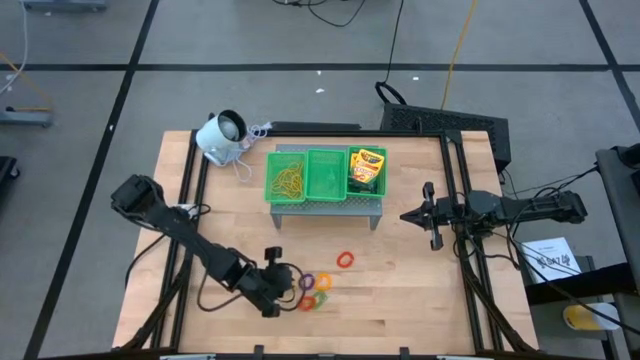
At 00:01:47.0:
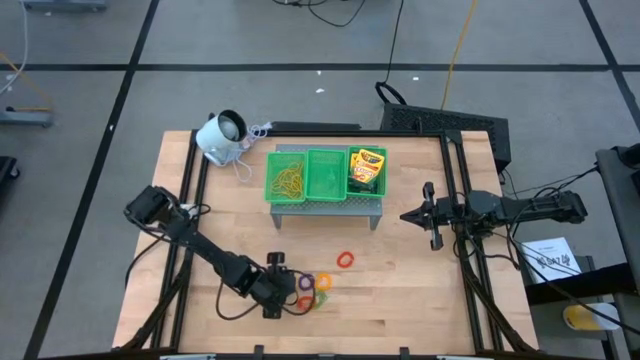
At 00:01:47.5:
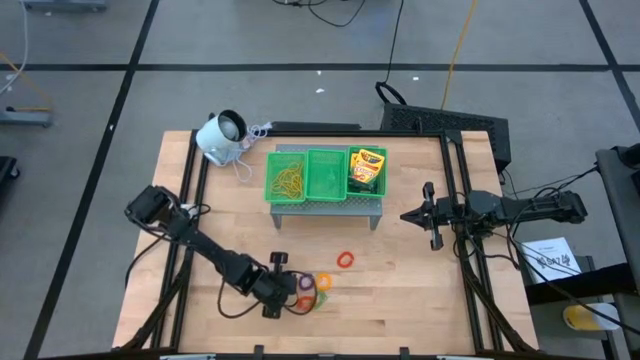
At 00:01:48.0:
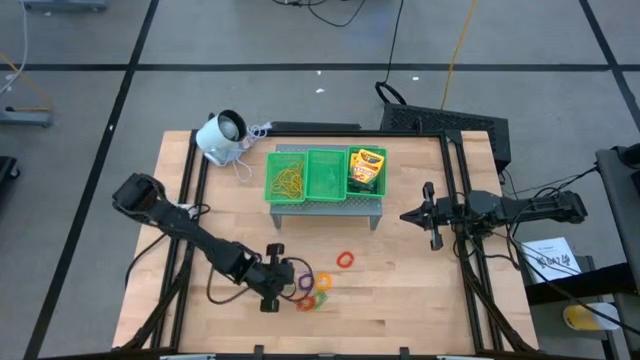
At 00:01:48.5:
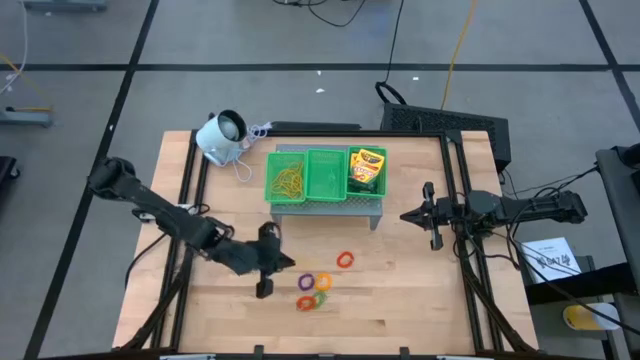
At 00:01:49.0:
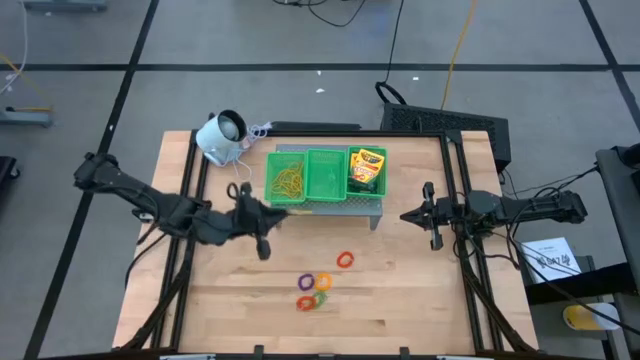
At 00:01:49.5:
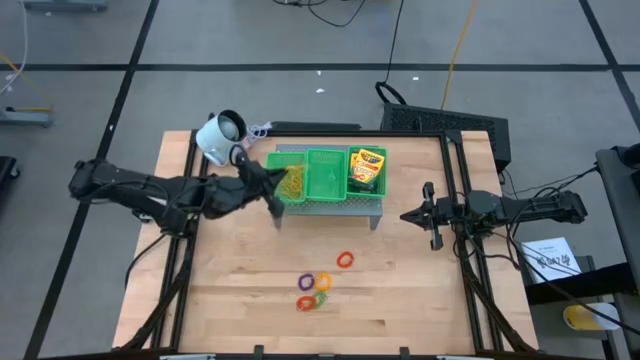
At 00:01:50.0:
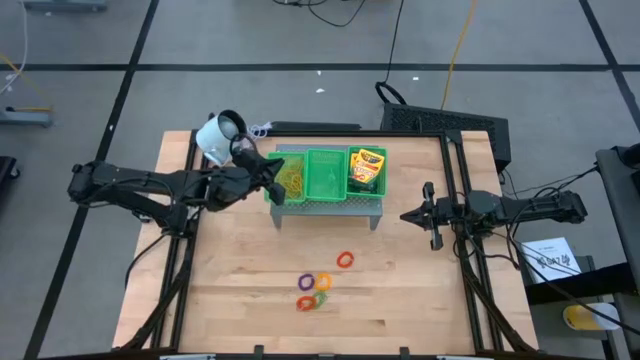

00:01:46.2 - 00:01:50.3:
Task: Pick & Place Office Desk Supplies
Put the yellow rubber band into the left green basket

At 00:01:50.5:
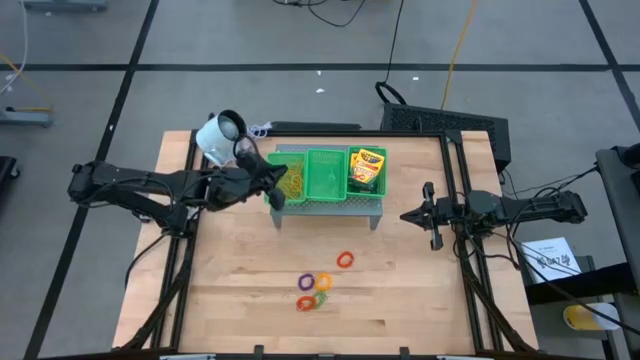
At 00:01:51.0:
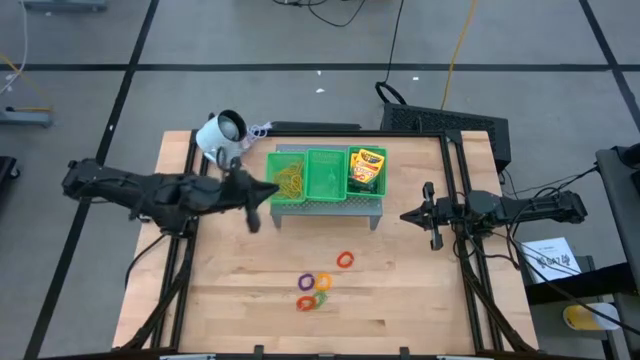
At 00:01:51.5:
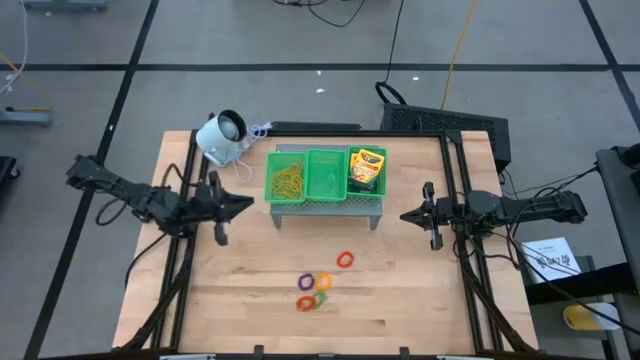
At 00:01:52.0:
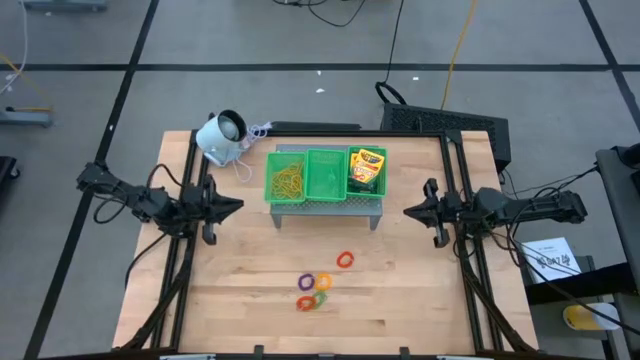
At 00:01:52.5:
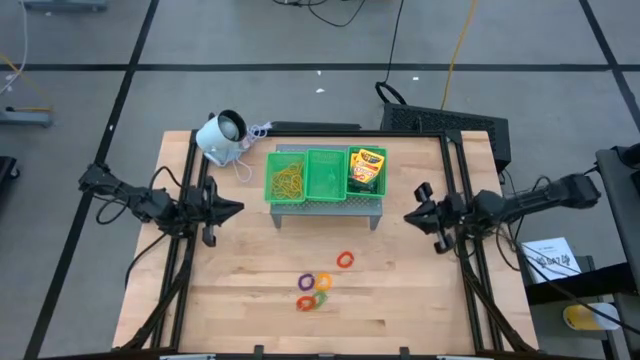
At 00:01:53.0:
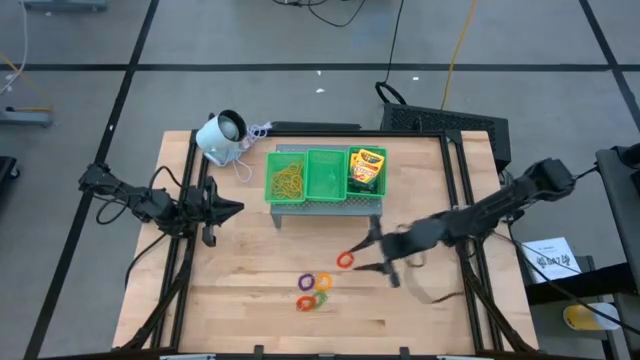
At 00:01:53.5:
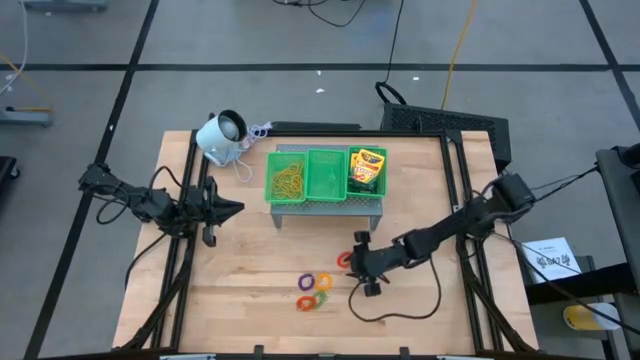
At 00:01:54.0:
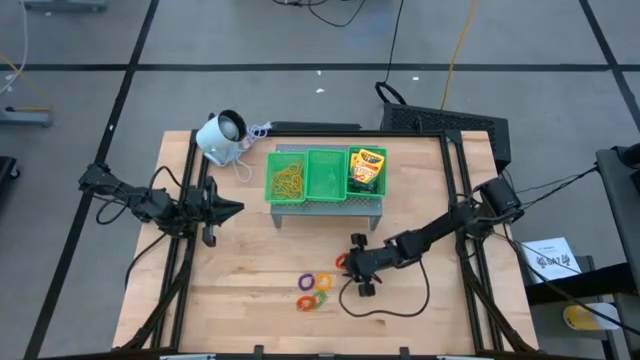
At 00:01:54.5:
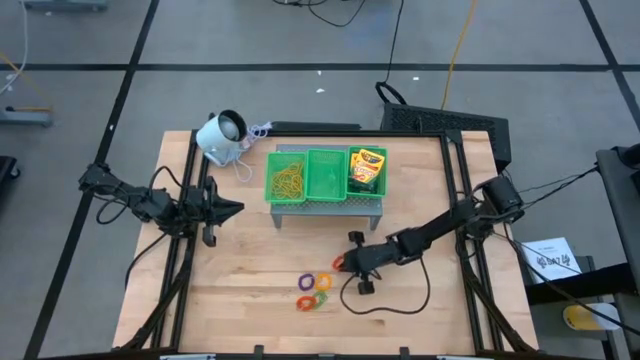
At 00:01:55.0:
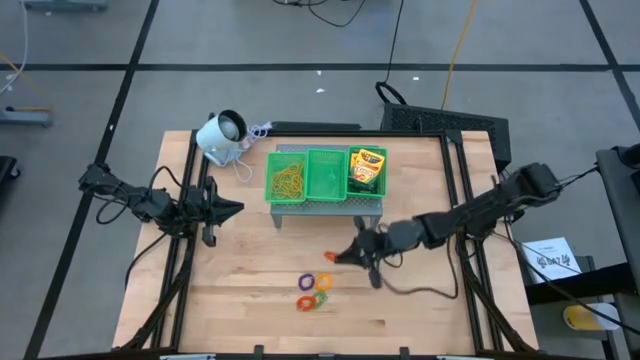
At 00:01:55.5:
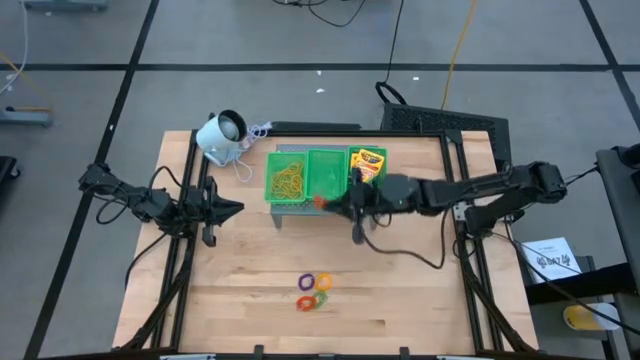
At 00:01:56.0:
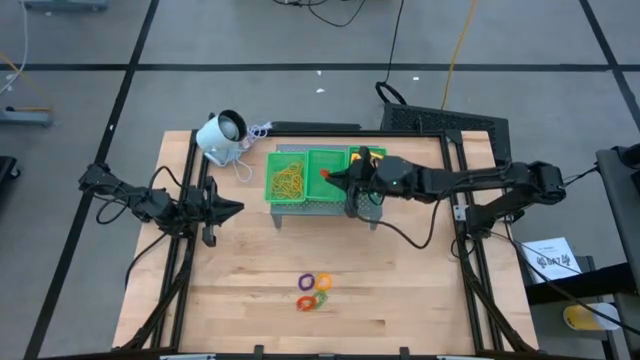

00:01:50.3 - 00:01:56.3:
Put the top orange spring keychain into the center green basket

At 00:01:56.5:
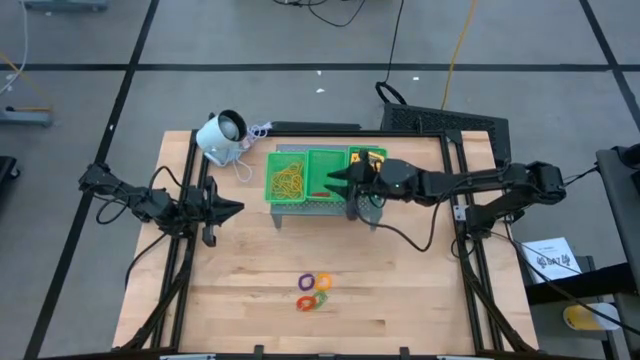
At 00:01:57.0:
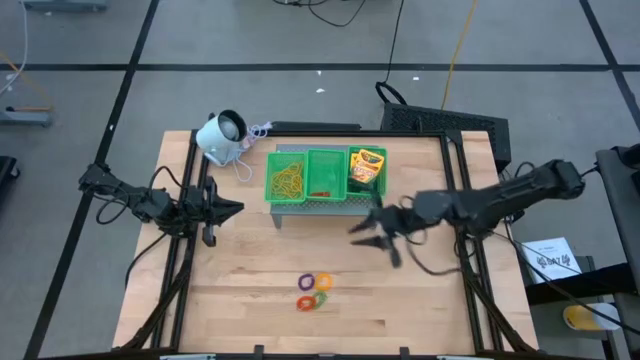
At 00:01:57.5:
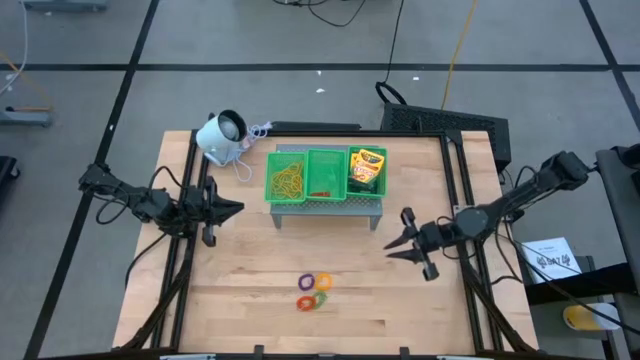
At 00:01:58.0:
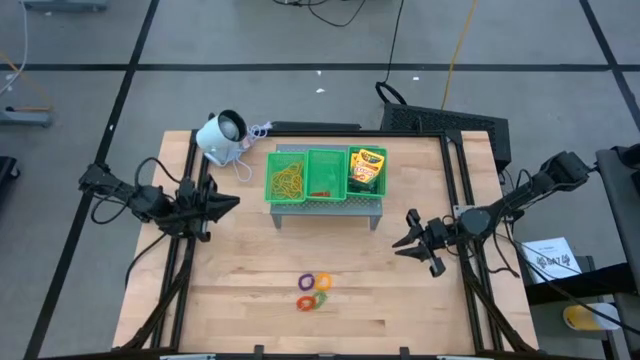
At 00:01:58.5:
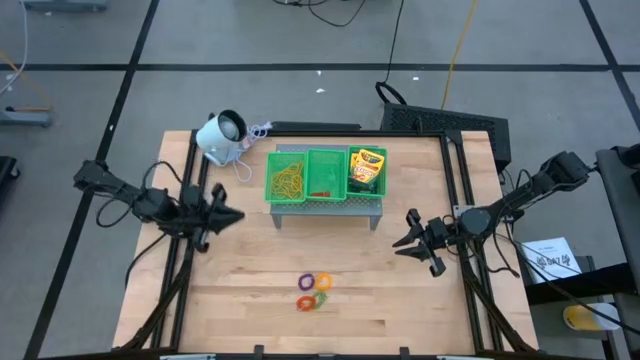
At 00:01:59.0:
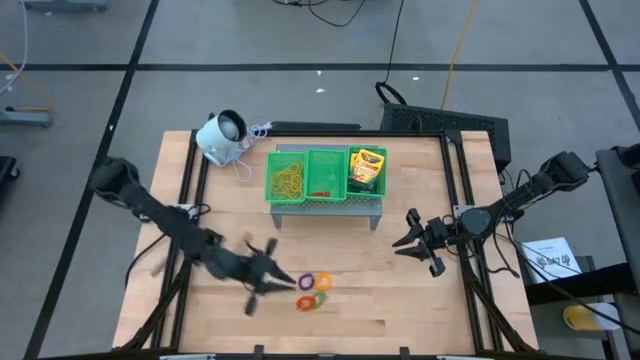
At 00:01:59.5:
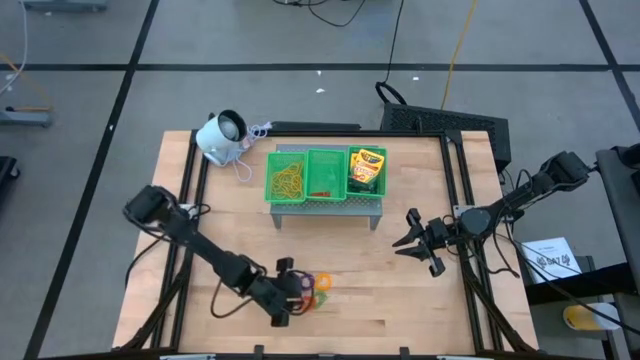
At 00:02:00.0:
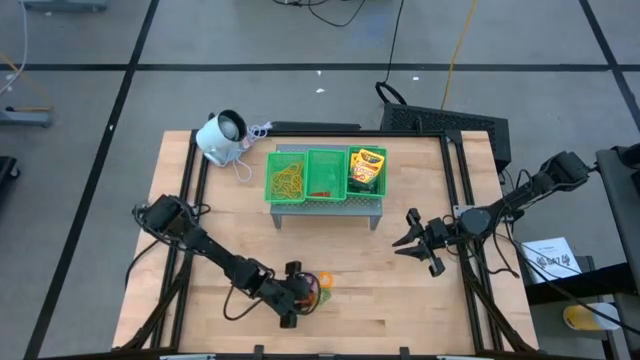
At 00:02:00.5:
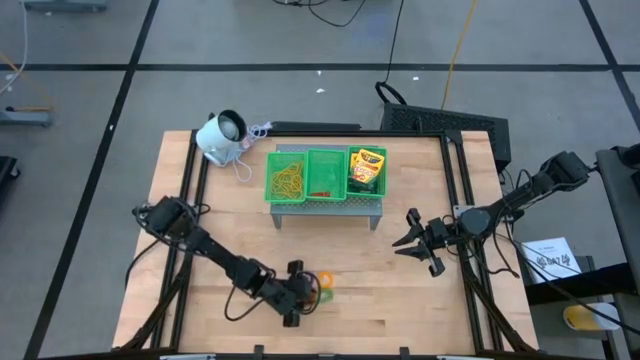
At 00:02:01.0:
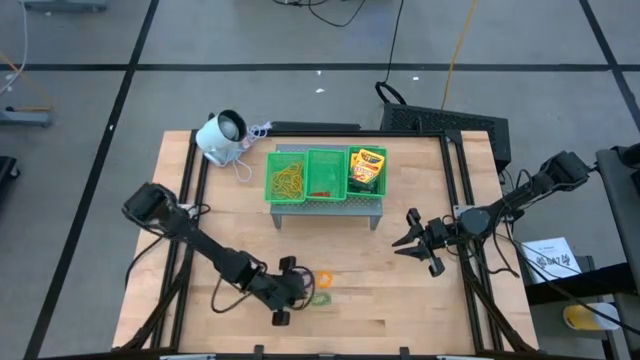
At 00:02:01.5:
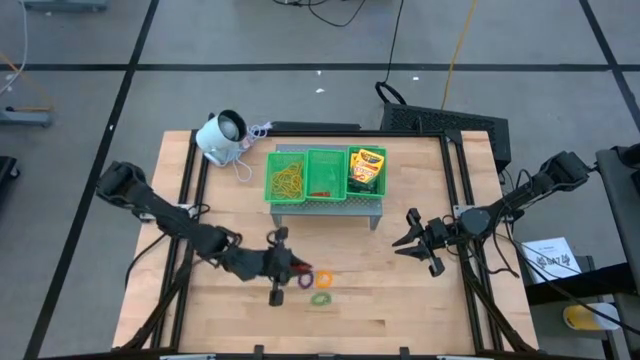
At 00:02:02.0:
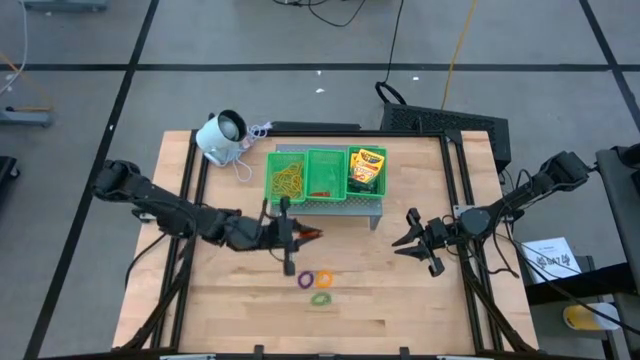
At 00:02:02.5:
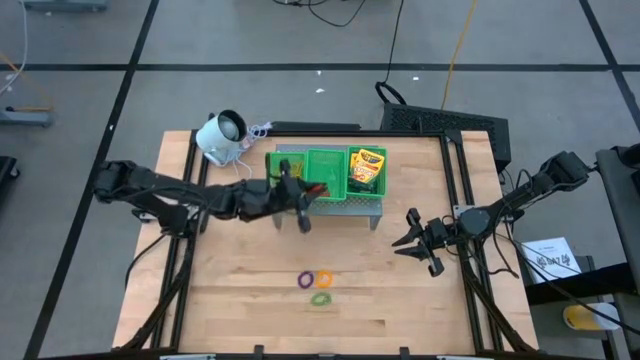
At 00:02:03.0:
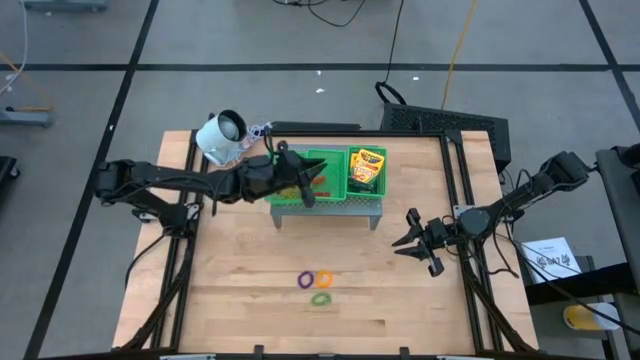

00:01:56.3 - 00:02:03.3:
Put the orange spring keychain into the center green basket

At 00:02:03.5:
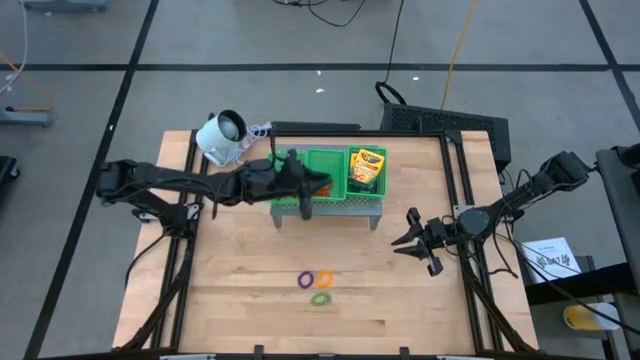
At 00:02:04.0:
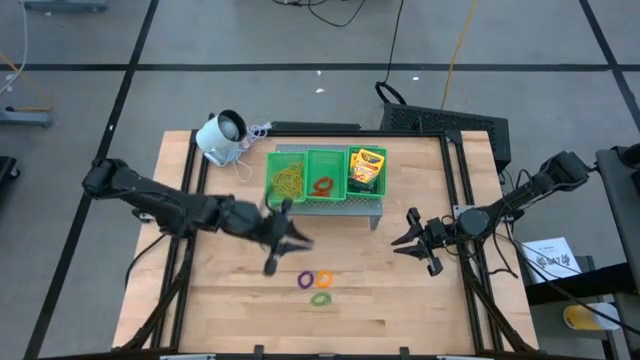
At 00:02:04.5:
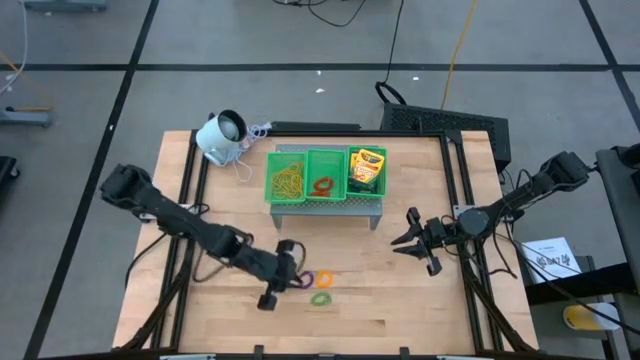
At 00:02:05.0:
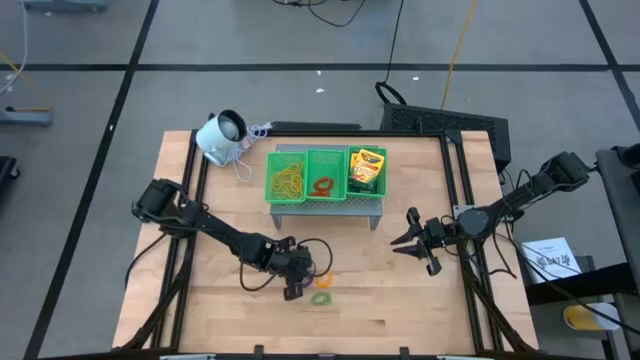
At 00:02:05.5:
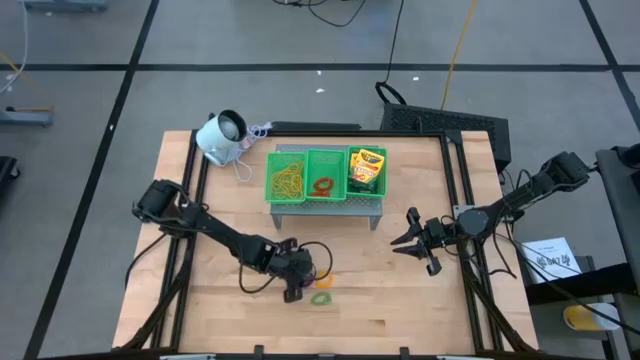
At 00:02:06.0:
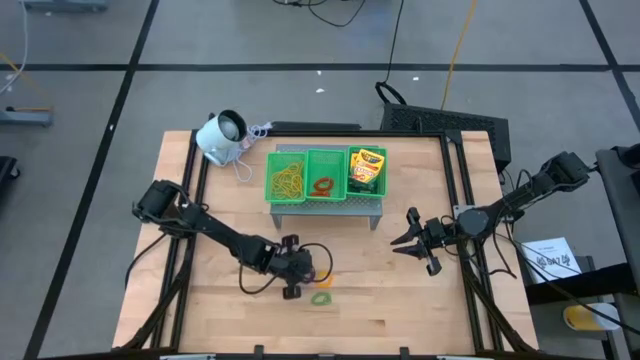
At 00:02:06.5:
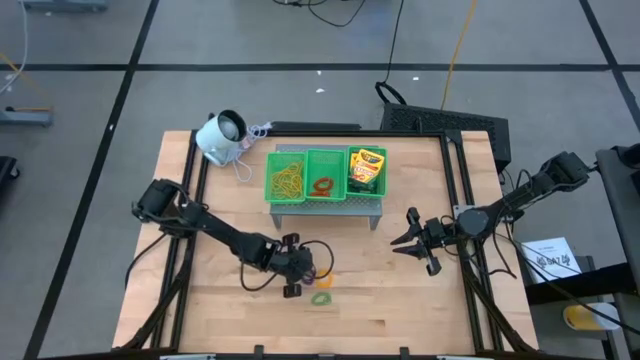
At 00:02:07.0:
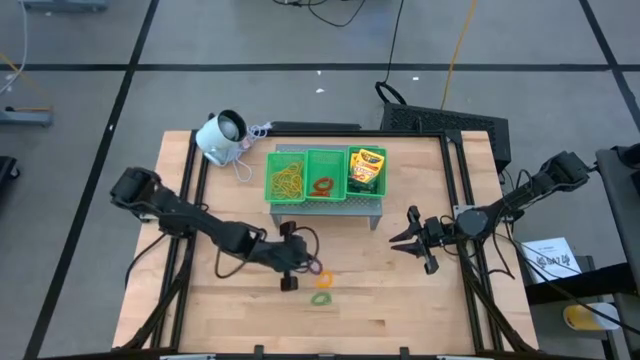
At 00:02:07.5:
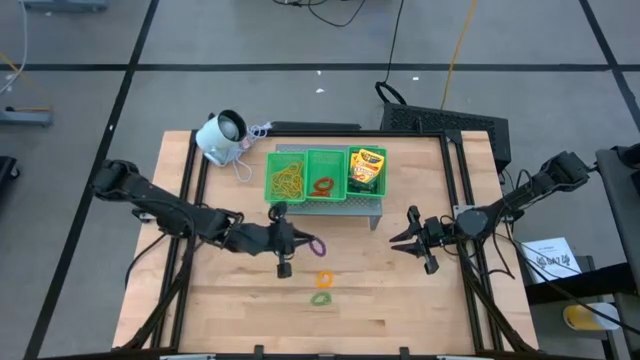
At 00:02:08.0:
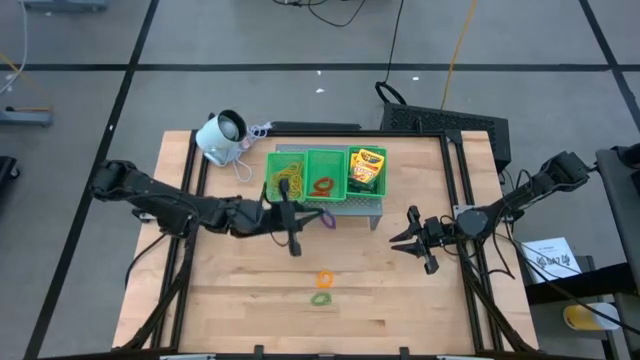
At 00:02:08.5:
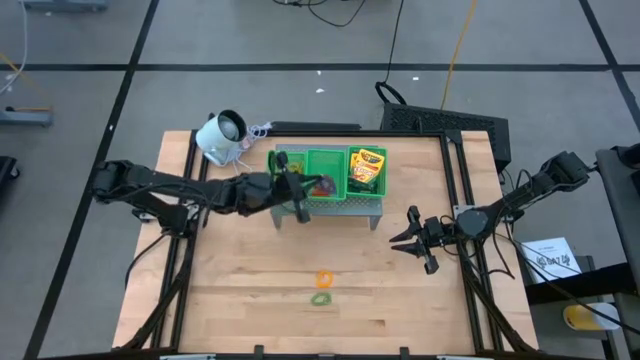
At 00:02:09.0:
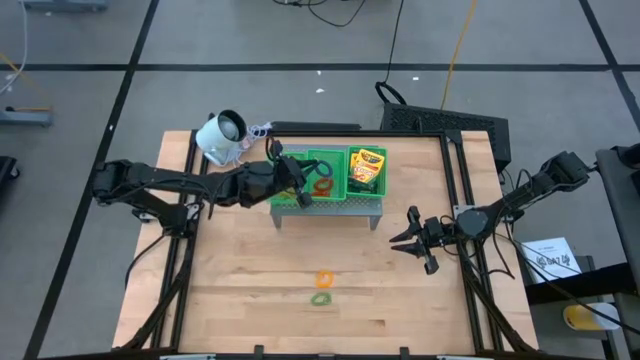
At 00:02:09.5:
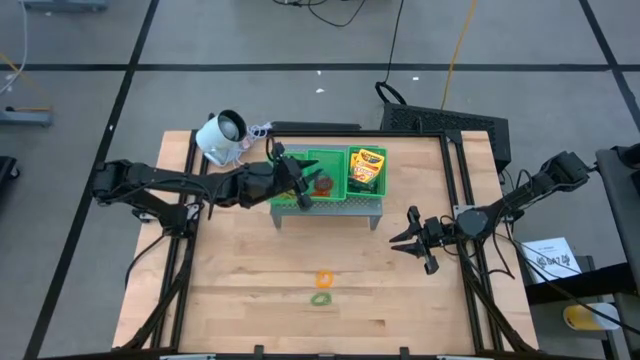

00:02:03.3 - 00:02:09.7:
Put the purple spring keychain into the center green basket
